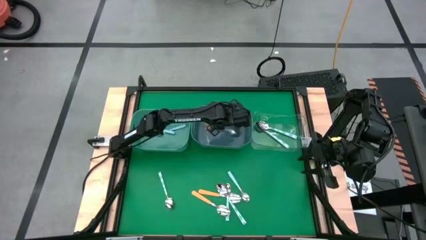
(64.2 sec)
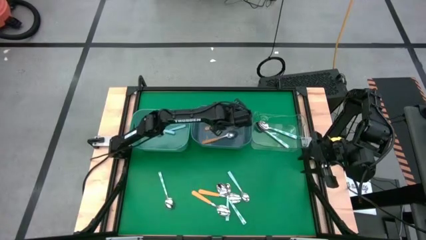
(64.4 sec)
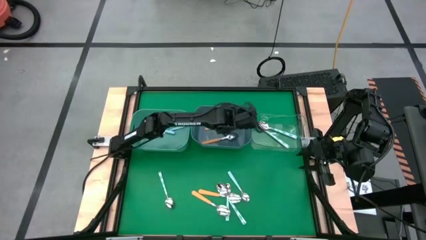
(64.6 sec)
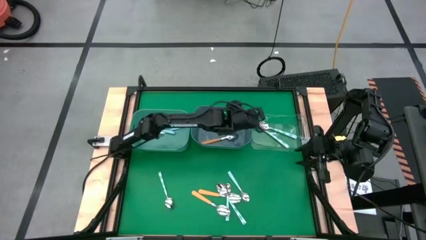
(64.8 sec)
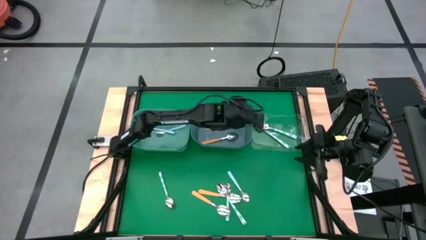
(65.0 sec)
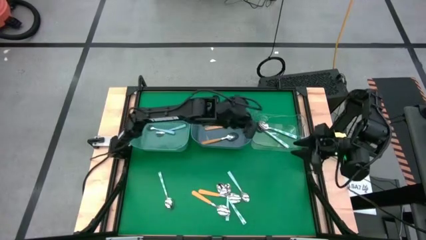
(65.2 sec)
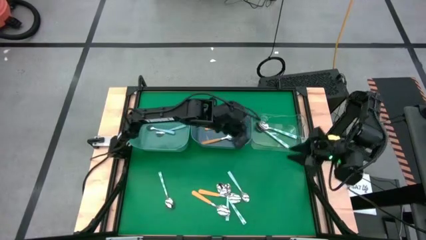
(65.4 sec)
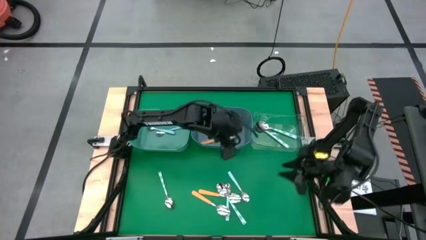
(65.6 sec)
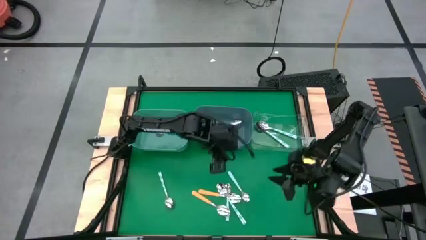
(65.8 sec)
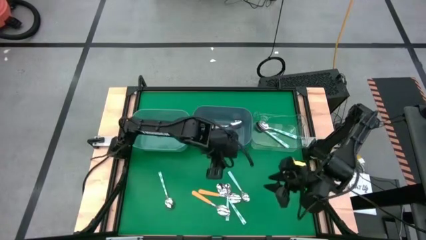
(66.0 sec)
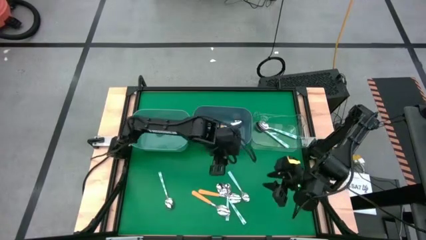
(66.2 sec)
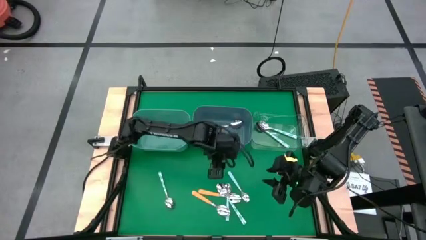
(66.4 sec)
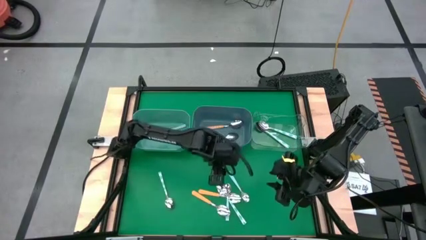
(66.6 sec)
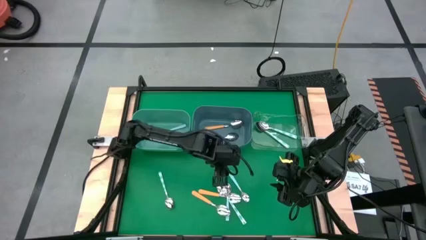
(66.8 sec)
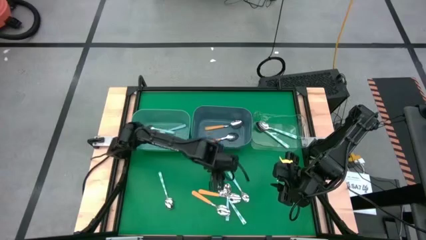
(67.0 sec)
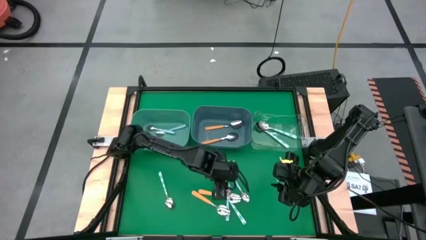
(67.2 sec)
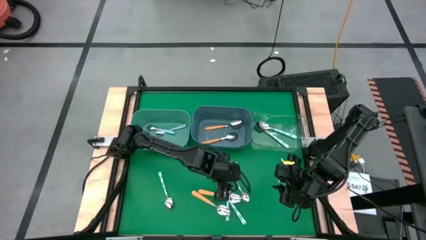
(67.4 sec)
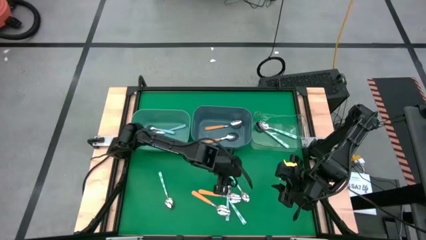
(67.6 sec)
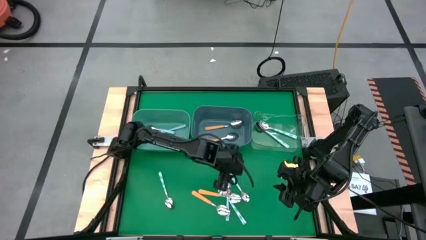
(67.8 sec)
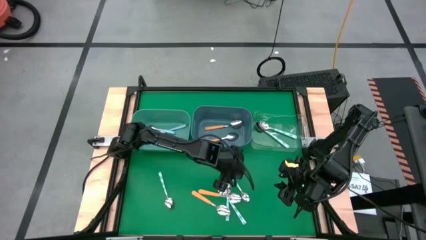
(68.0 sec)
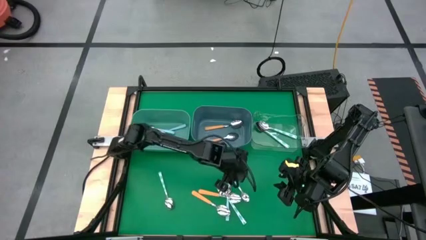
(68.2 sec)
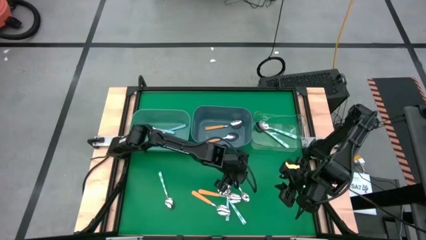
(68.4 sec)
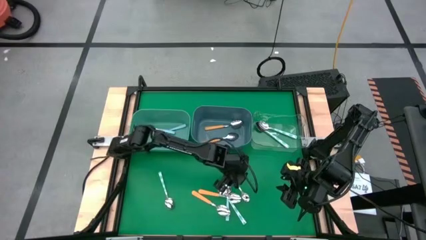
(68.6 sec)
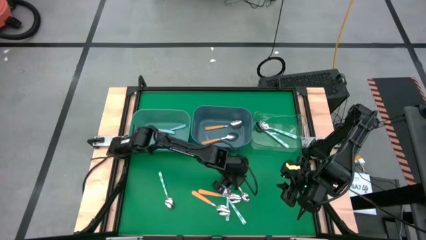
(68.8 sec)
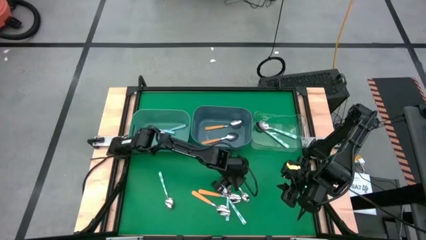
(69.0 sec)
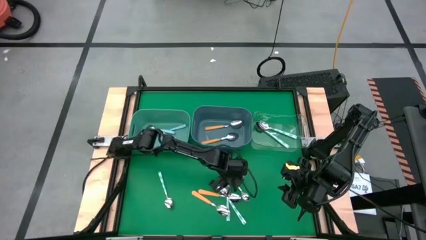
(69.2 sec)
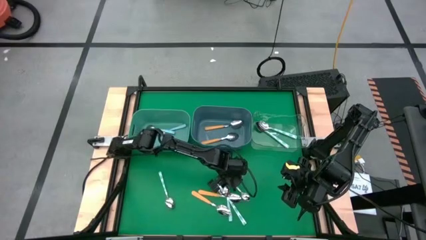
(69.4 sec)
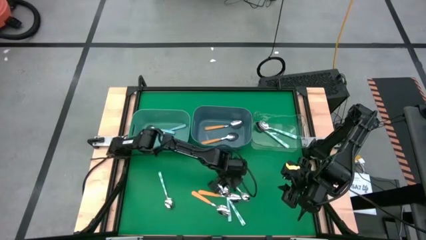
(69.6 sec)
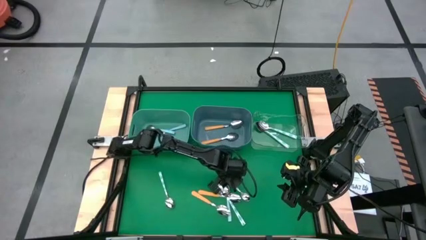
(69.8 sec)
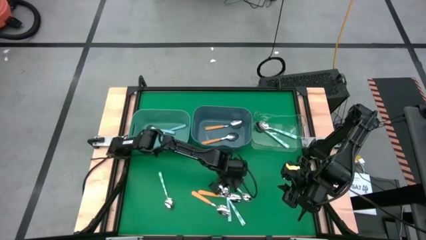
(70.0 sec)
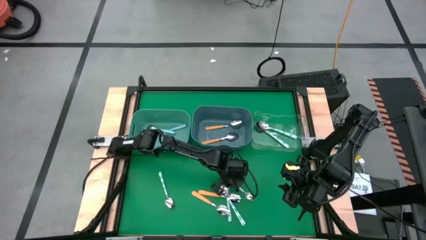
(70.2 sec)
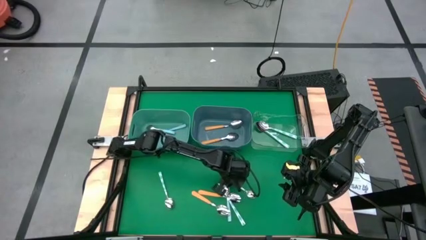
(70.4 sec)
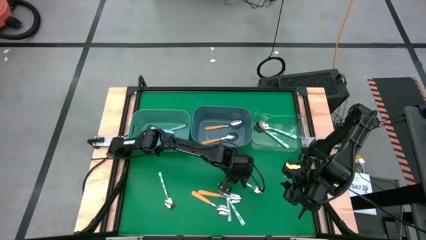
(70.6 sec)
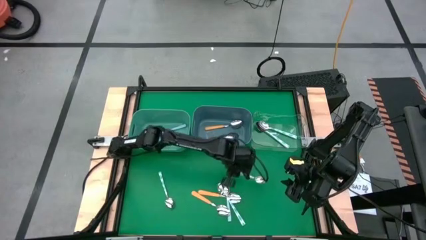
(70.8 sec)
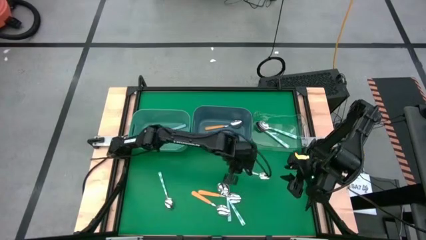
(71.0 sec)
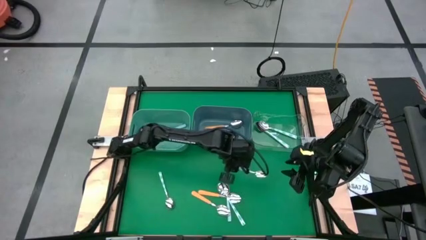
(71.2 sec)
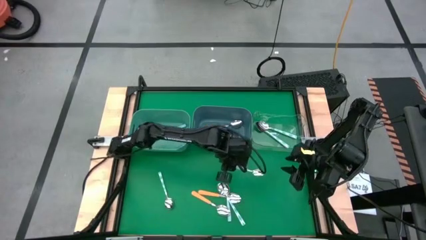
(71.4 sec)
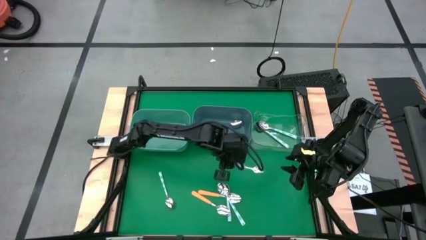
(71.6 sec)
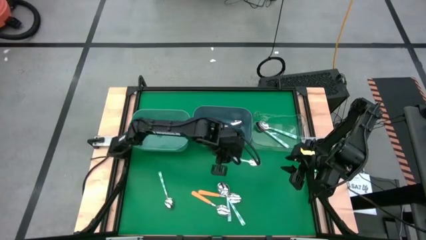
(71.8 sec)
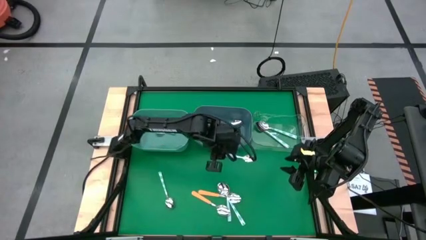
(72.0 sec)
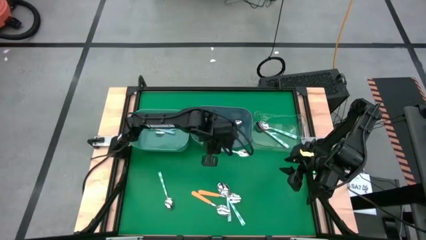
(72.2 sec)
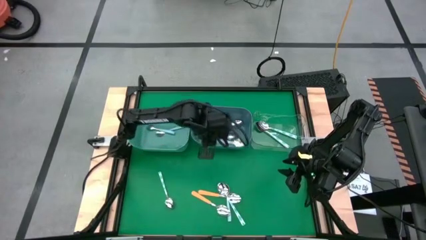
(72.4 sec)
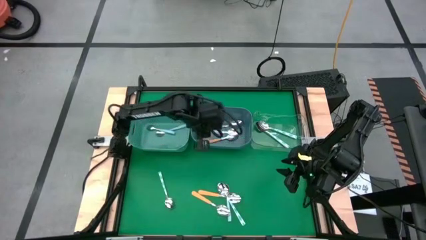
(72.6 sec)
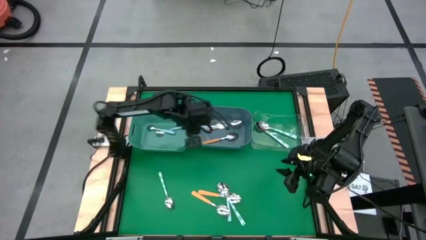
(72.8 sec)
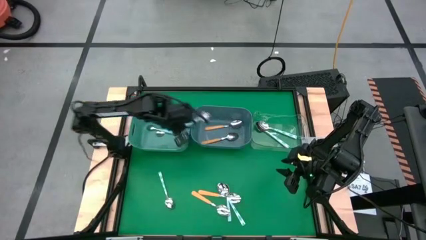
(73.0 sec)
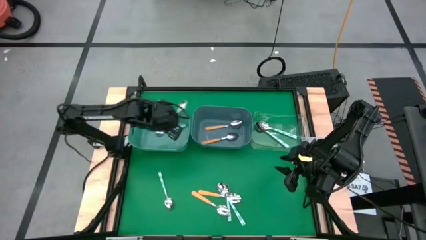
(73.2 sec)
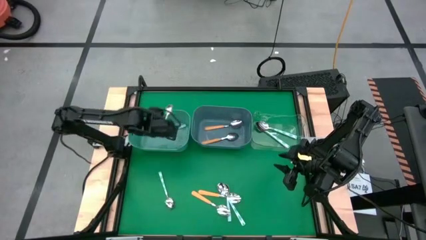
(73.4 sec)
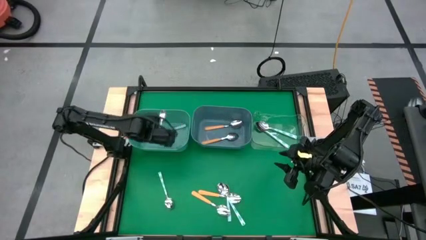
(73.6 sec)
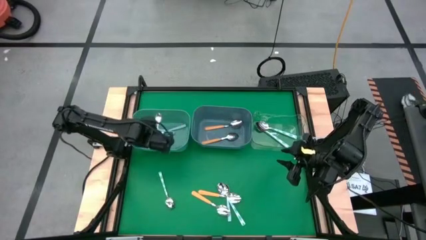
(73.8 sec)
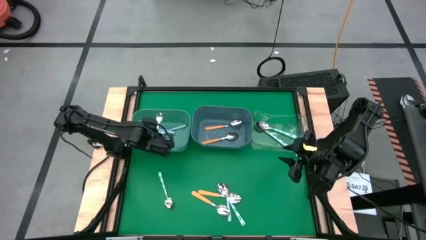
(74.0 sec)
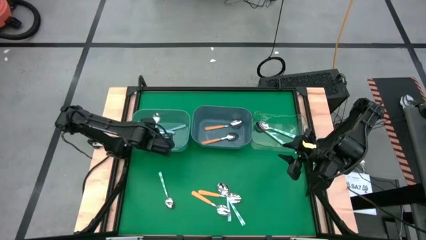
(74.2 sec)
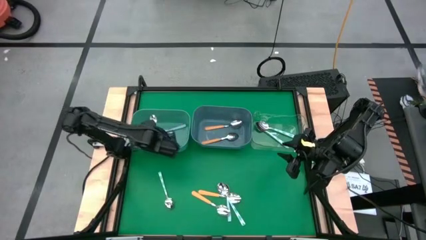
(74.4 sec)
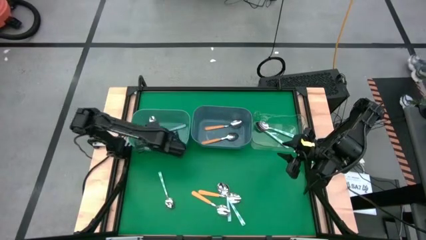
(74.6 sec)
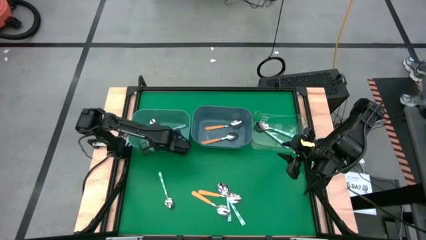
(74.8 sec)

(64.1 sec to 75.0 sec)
Task: Sort silverware by color (type)
Put the blue spoon into the green bin

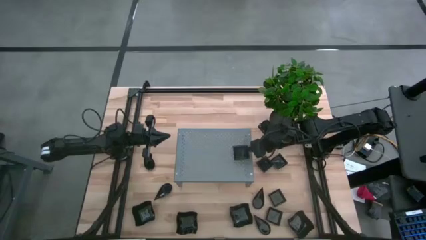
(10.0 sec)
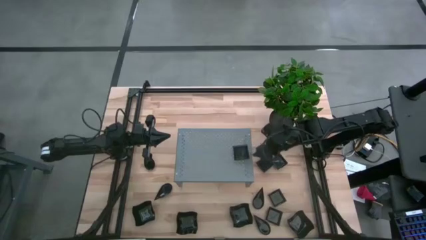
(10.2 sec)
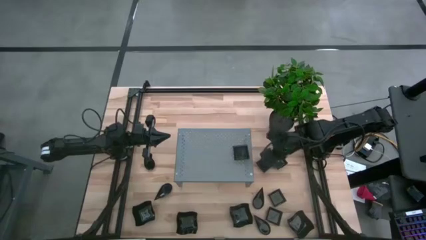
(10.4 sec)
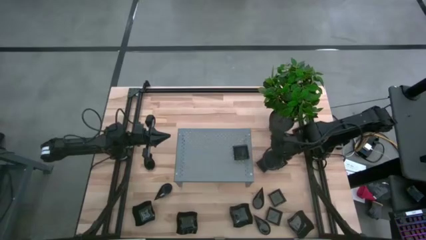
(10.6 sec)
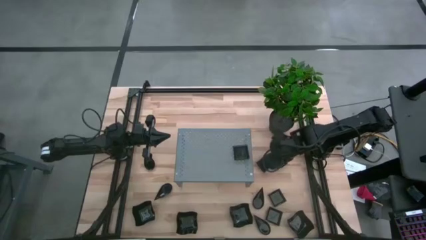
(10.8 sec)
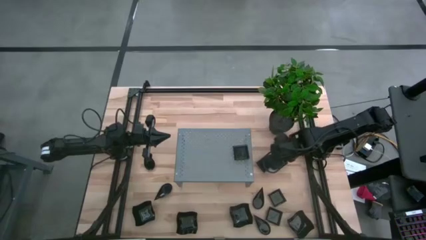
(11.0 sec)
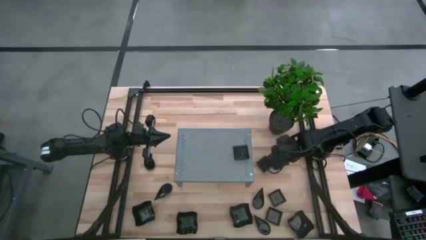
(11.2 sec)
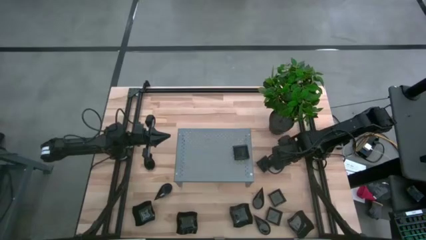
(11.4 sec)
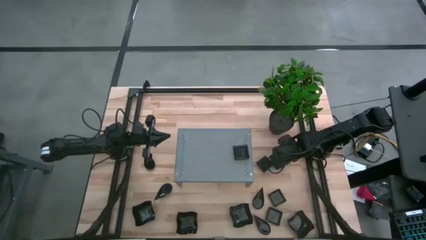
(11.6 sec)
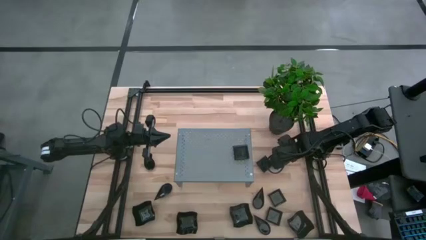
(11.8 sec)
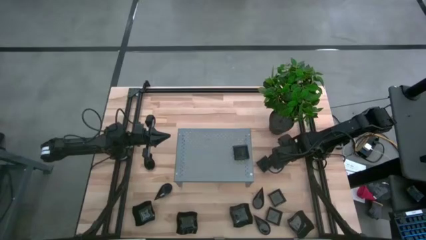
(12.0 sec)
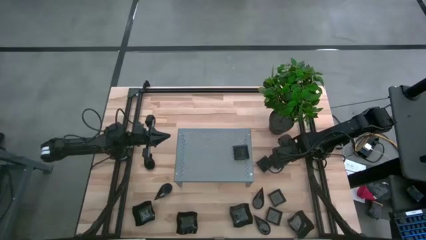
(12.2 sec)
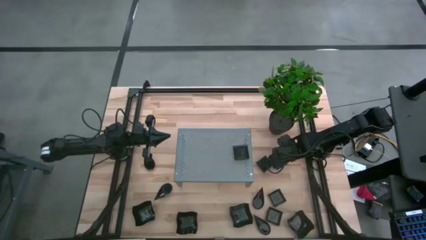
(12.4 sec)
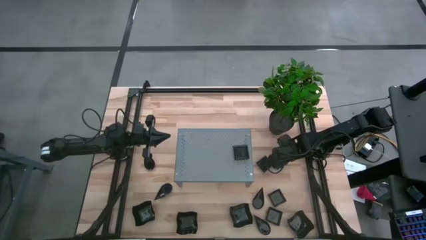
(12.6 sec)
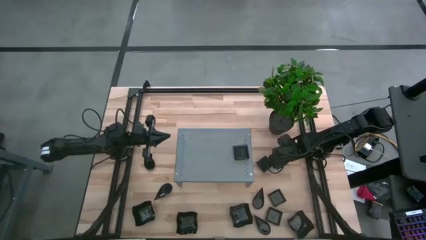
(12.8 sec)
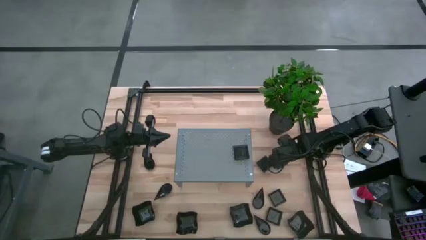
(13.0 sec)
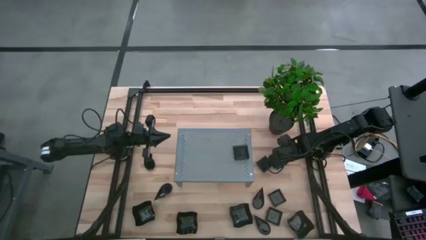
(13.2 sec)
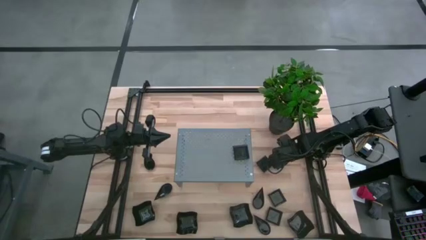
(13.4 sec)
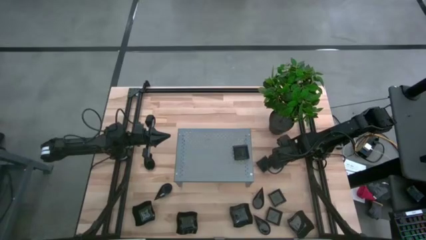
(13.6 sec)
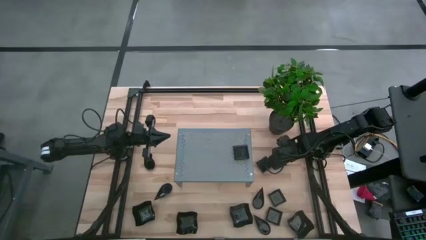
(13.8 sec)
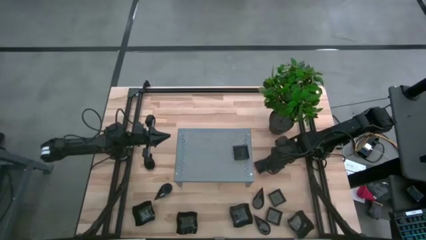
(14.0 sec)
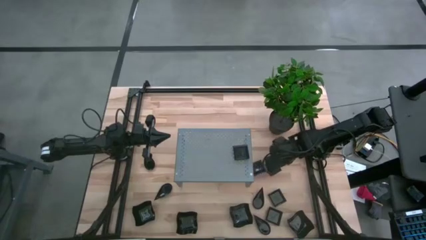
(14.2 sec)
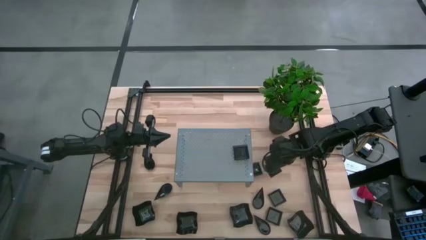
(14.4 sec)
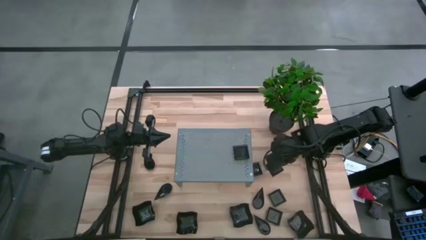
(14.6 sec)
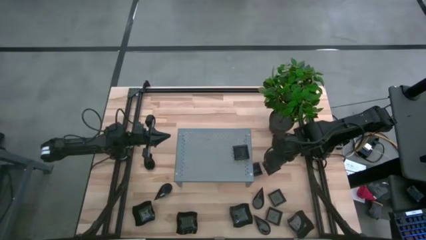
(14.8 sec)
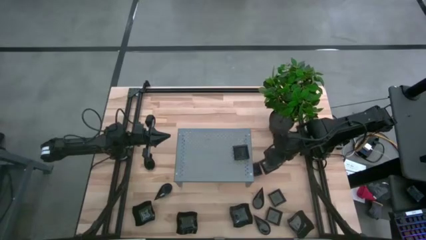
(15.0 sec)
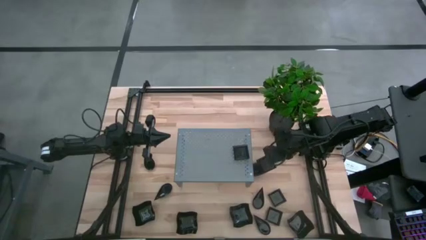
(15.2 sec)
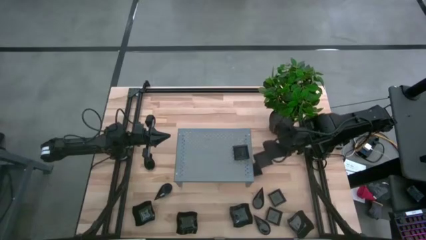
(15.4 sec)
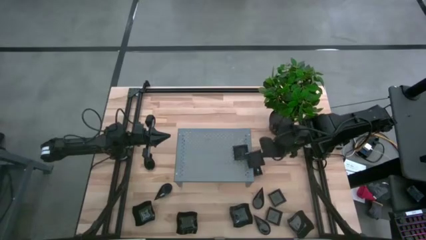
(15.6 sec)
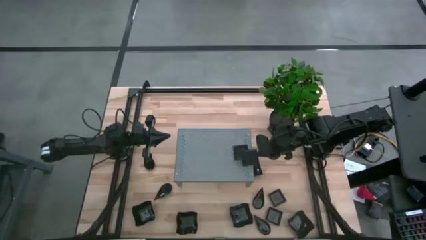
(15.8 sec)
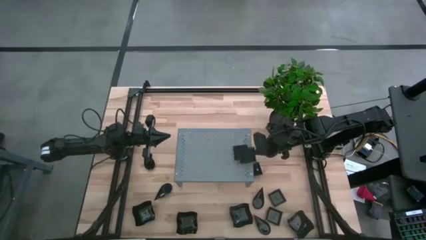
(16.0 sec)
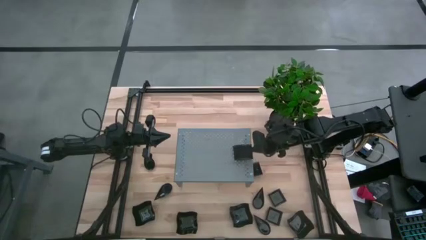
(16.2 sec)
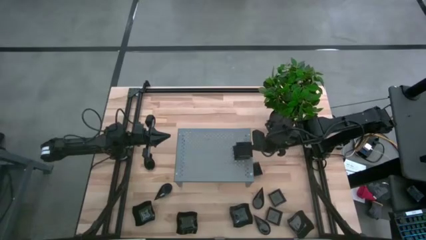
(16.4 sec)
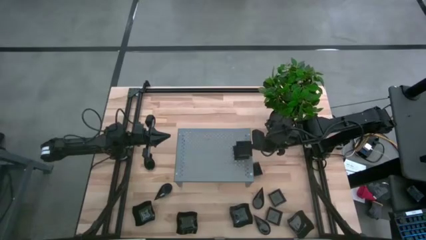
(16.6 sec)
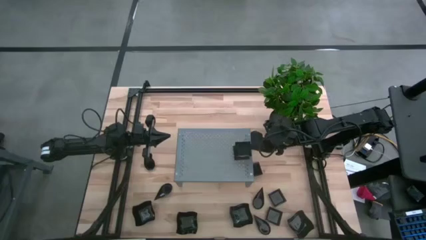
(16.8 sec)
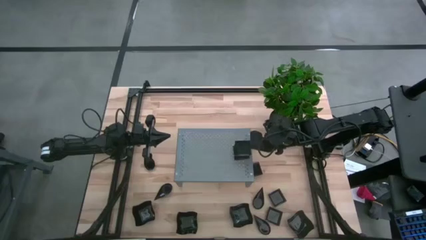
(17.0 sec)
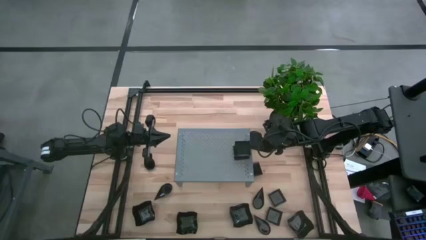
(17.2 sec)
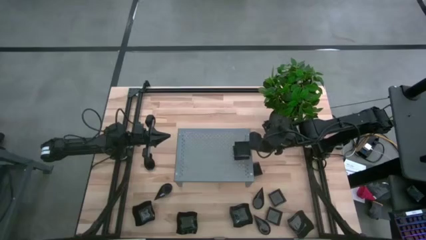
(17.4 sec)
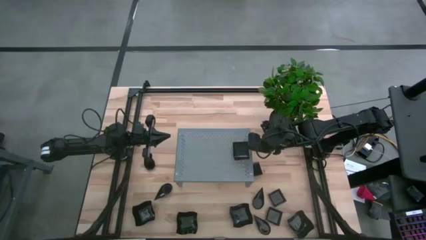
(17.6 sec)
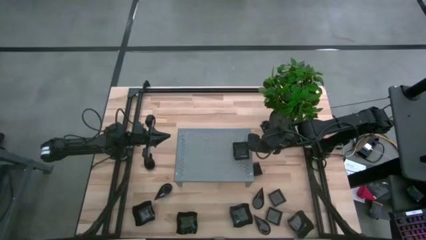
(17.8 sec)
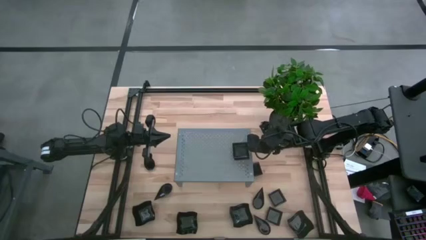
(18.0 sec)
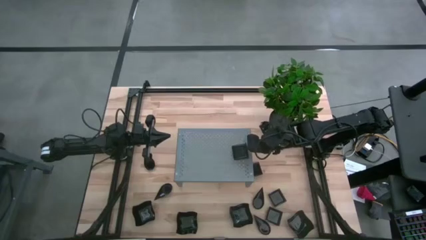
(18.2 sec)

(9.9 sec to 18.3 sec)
Task: Pick & Place Mini shaped plates
Stack the black square plate on the black square plate on the shelf
